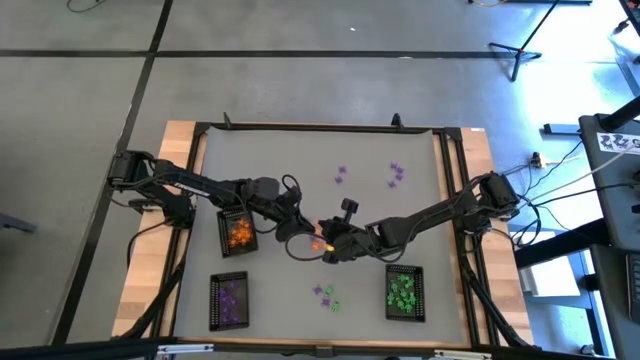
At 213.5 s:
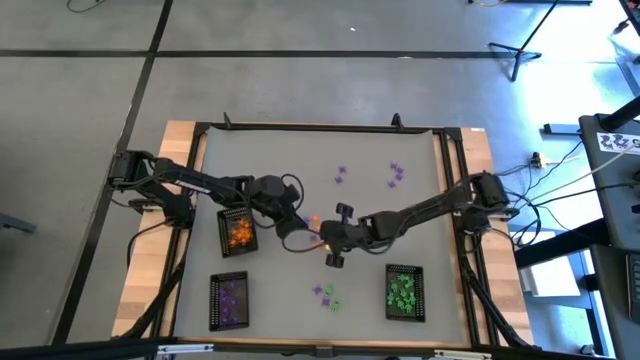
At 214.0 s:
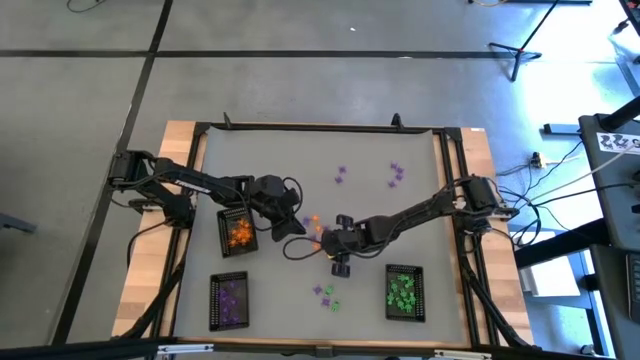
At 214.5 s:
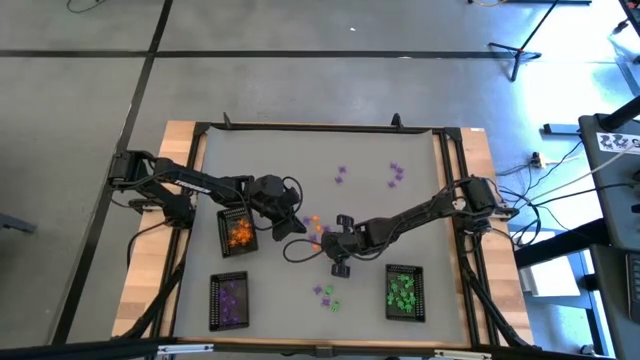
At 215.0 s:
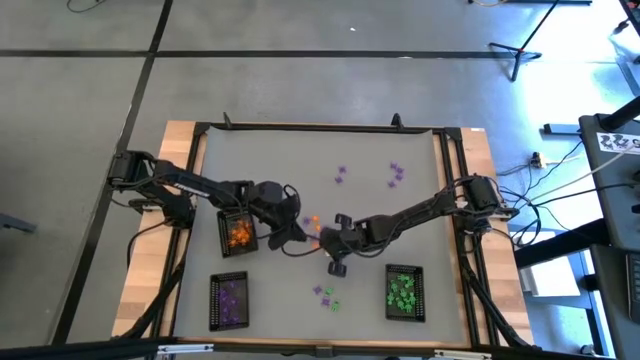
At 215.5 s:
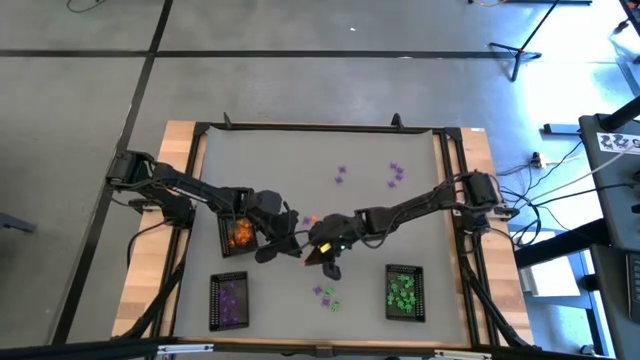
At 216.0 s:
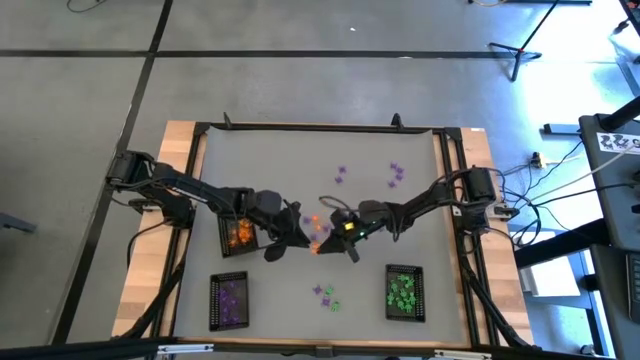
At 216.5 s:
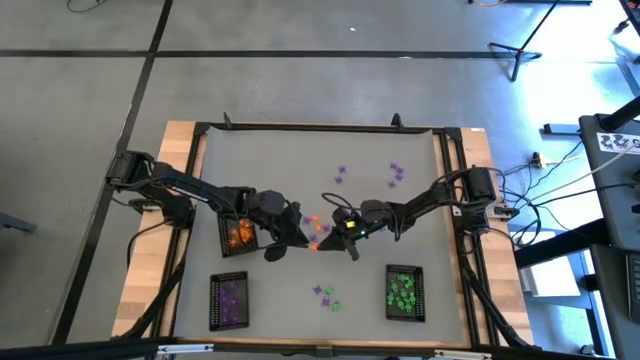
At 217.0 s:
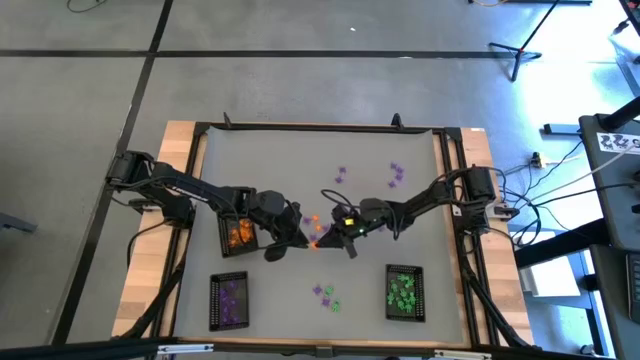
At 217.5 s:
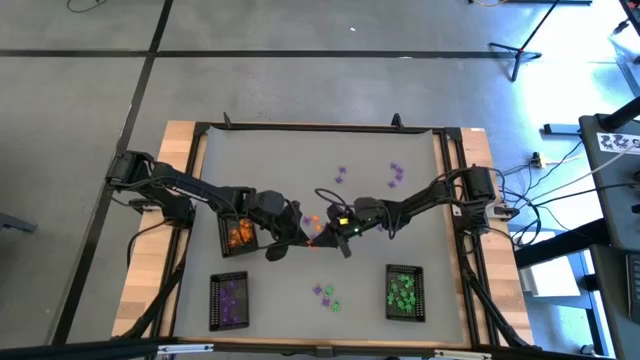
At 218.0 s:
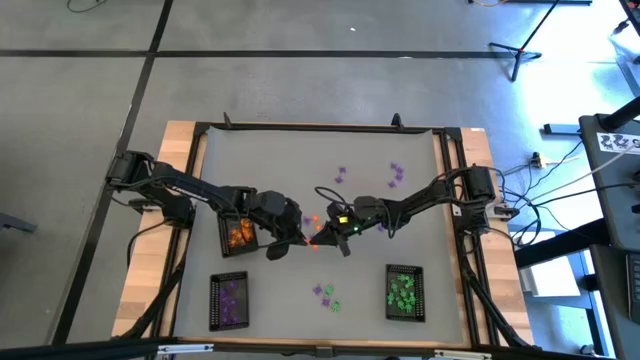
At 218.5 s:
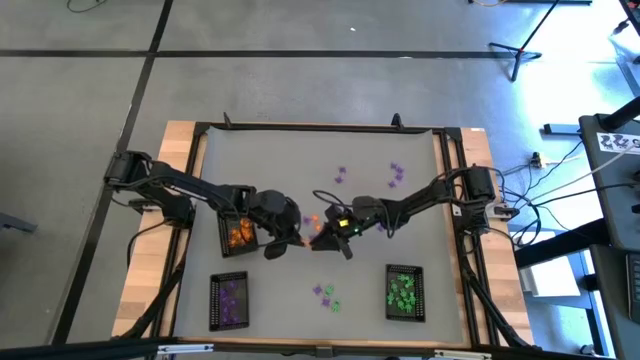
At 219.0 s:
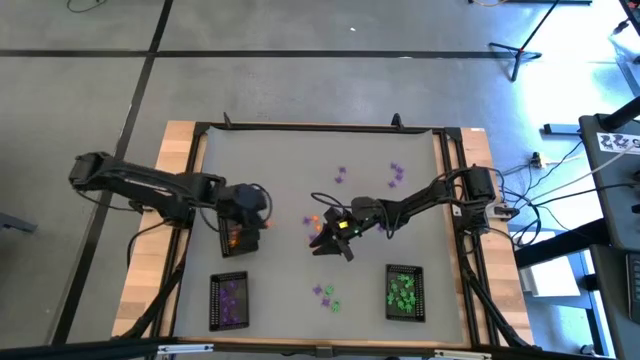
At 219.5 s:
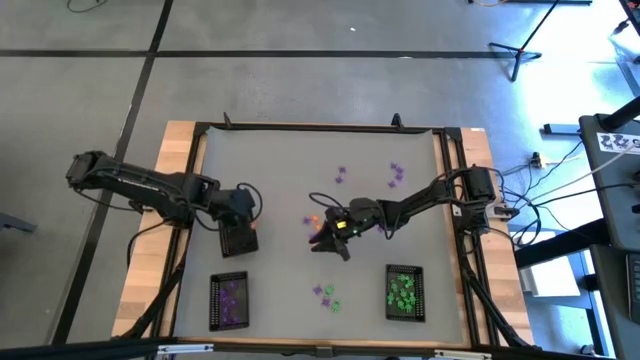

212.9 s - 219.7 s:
Task: Sort Halloween decoration
Put the orange spider toy into the top black basket

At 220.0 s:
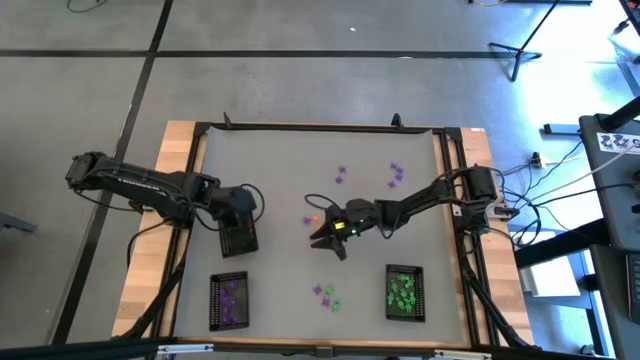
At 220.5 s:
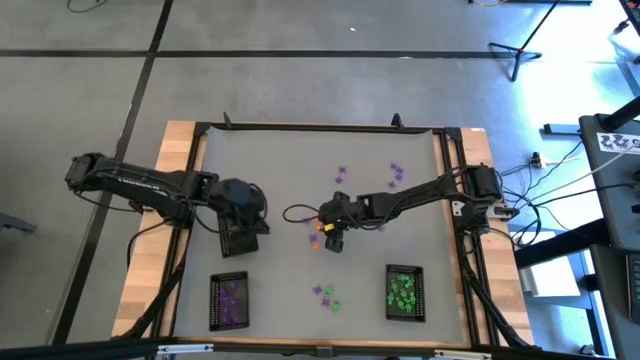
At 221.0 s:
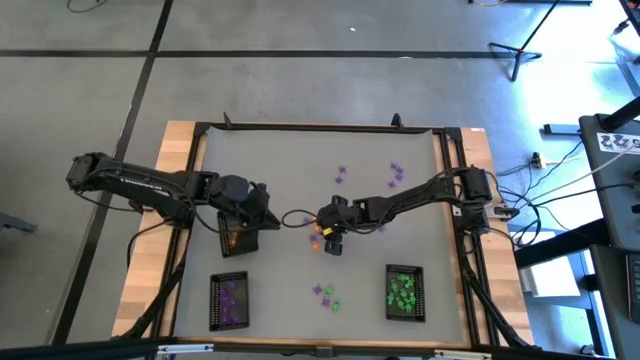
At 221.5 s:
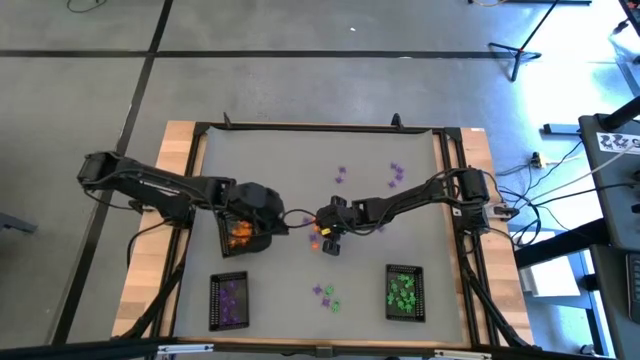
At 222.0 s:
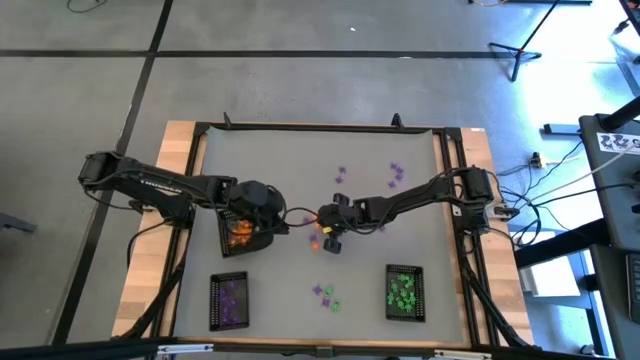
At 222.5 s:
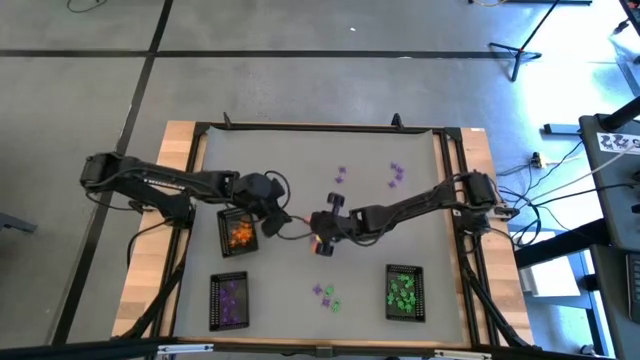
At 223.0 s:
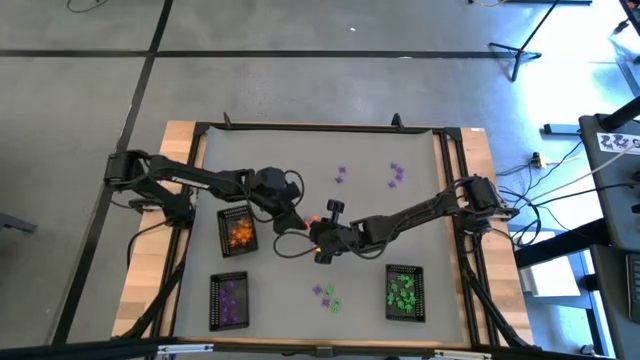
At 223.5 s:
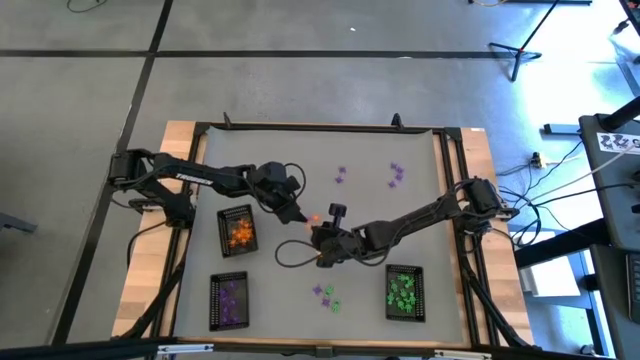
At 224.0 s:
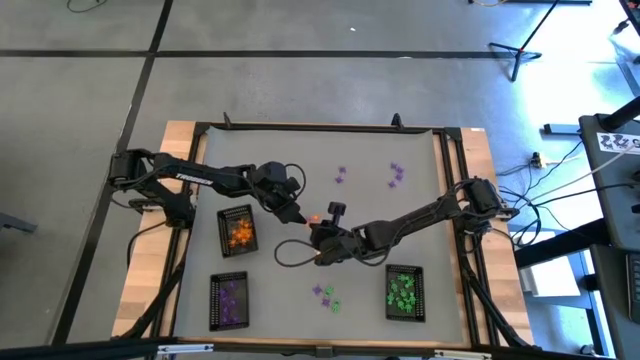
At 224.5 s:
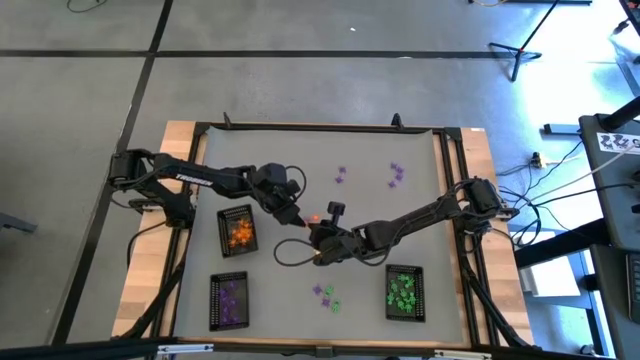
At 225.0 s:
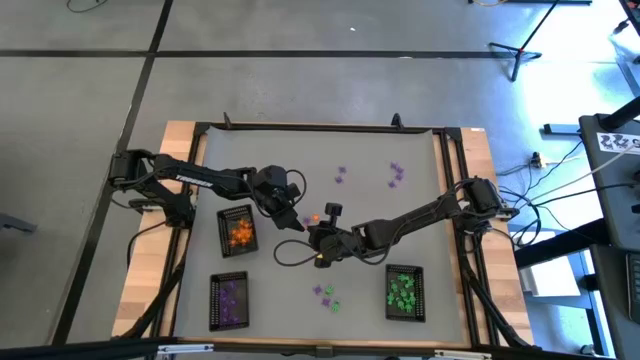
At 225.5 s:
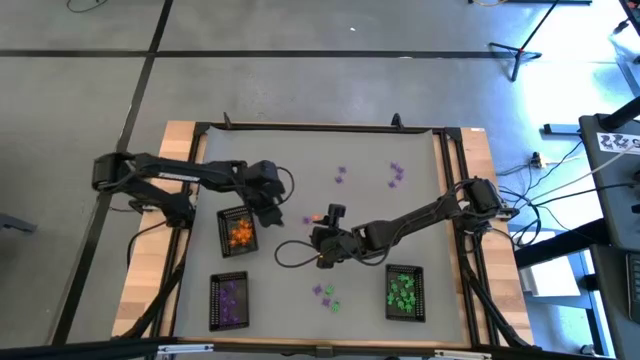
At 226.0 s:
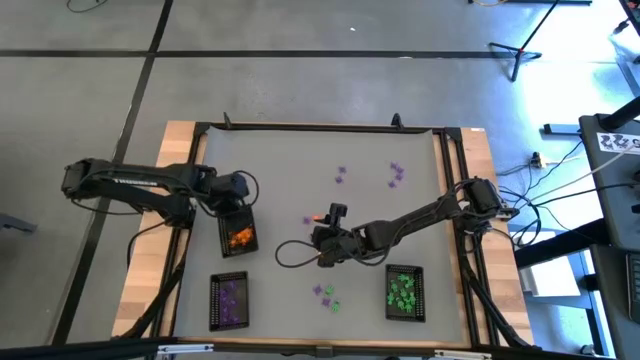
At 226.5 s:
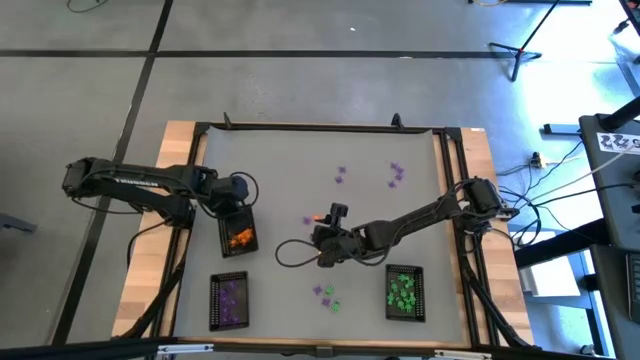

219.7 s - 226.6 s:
Put the orange spider toy into the top black basket

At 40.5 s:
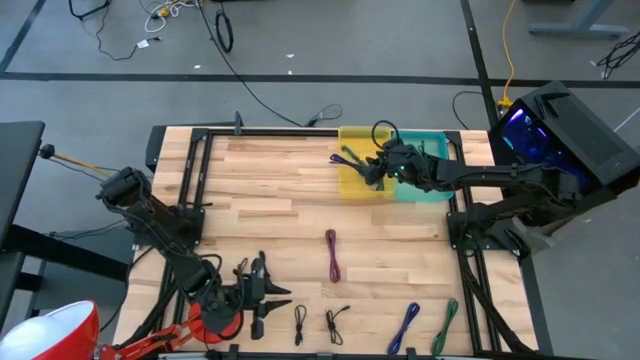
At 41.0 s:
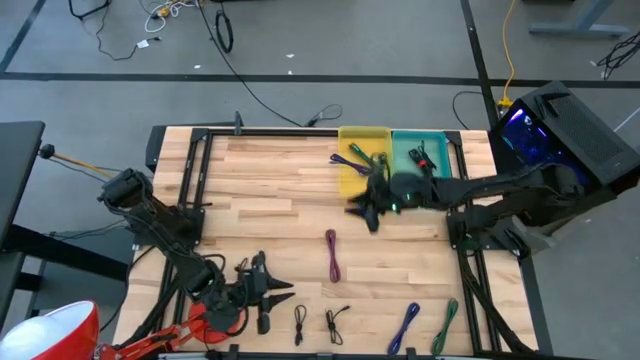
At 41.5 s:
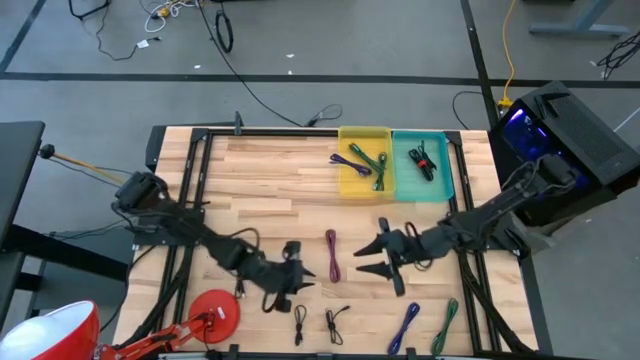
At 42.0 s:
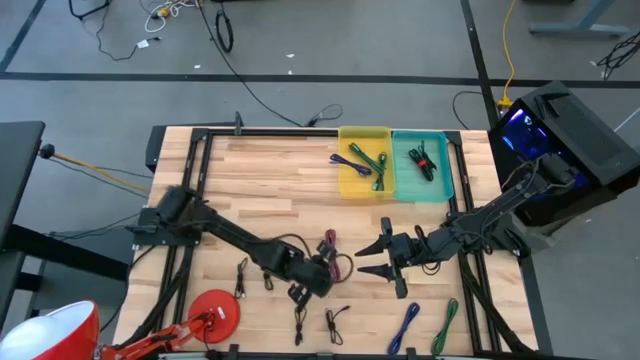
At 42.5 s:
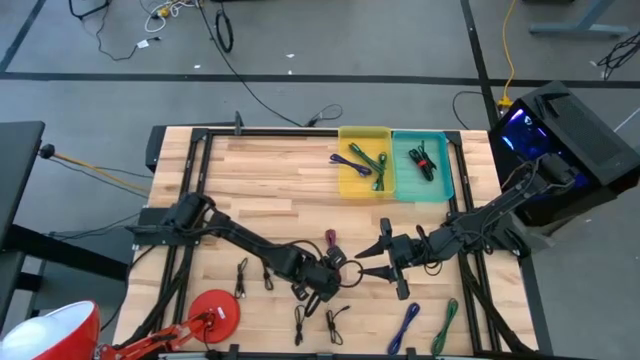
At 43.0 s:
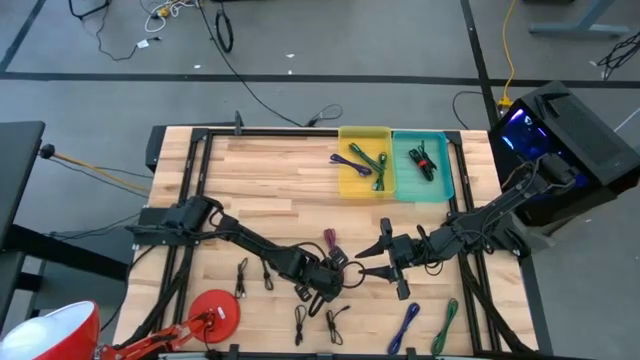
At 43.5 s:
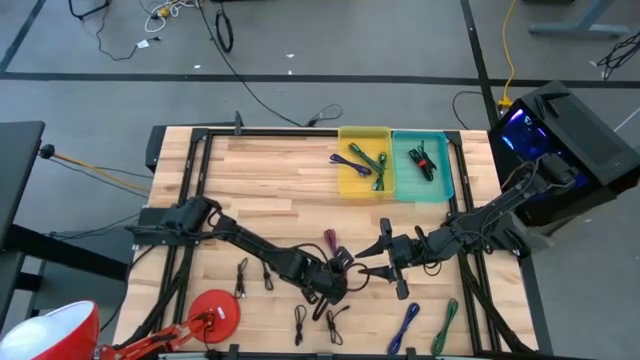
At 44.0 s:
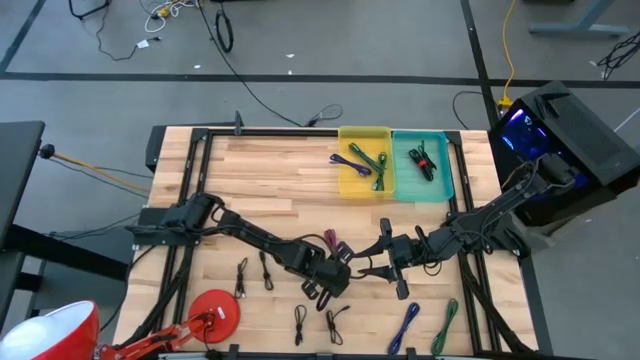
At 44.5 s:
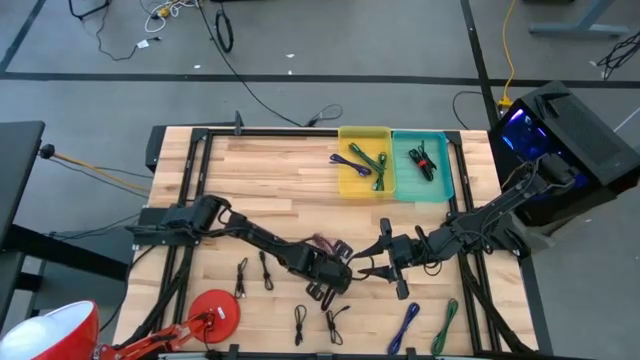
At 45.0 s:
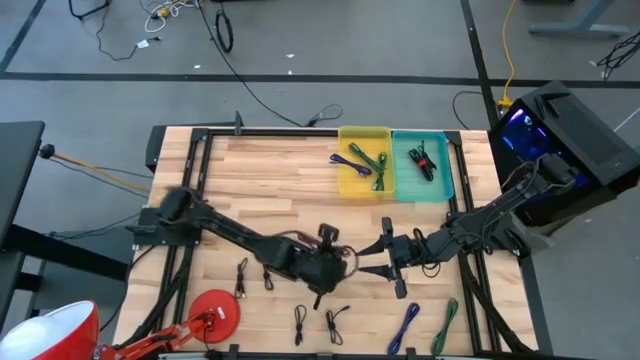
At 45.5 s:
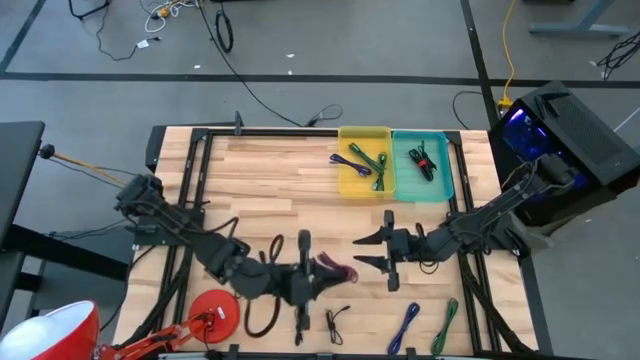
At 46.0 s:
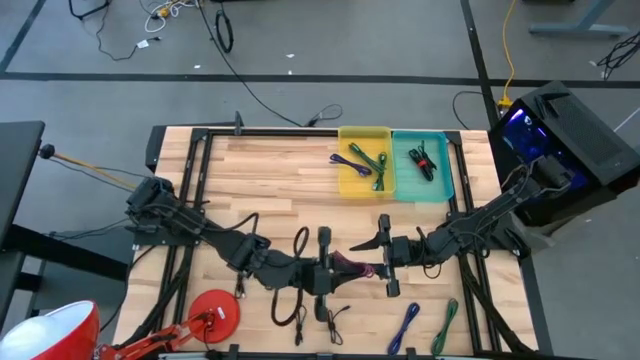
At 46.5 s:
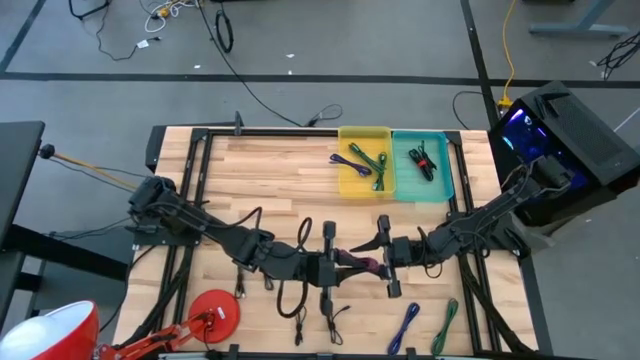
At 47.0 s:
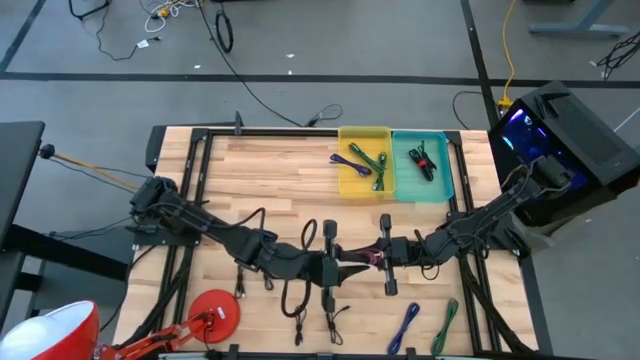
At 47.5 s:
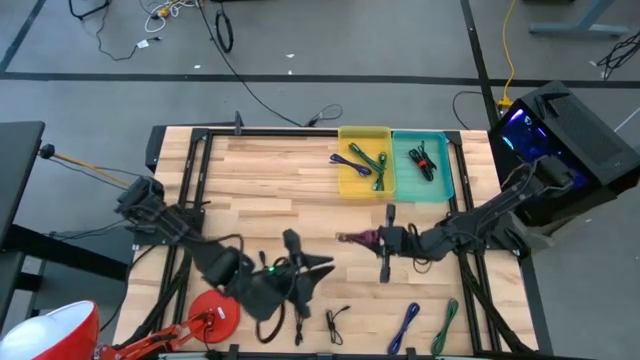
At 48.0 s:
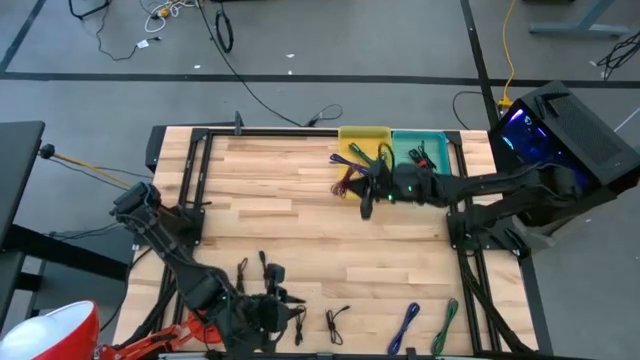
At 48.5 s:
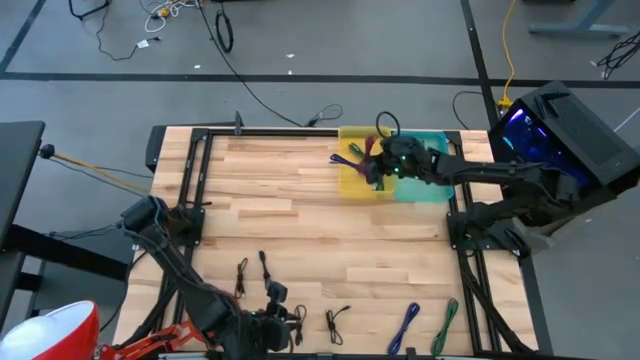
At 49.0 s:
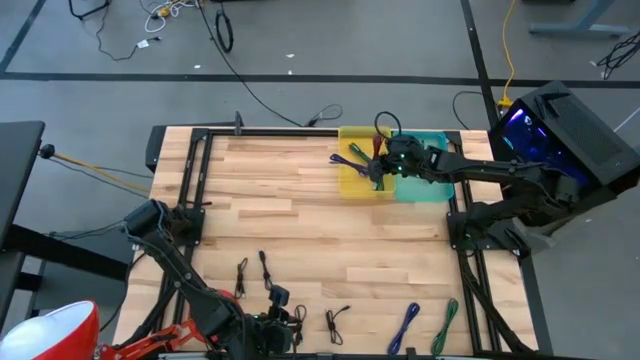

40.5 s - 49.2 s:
Task: Pick & Place USB Port
Put the pink black charger cable into the yellow bin
